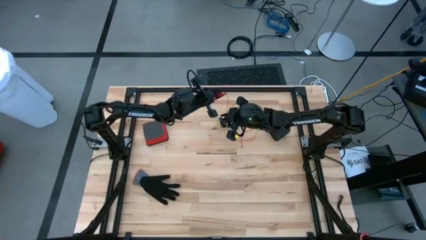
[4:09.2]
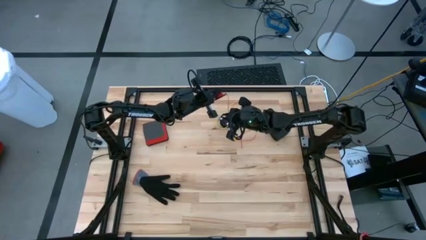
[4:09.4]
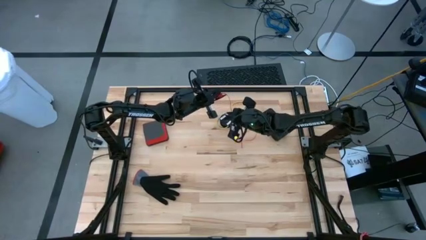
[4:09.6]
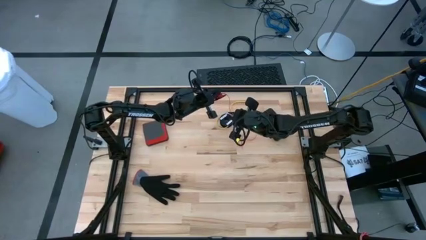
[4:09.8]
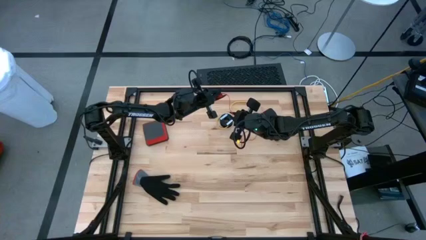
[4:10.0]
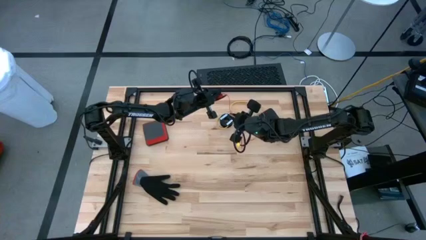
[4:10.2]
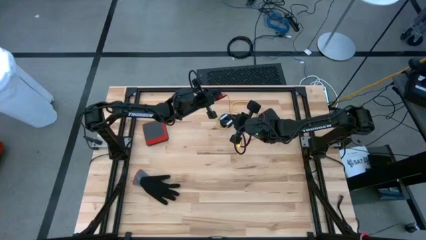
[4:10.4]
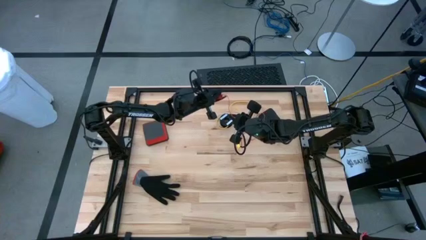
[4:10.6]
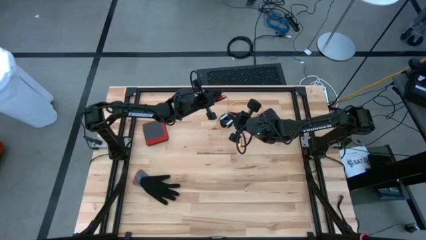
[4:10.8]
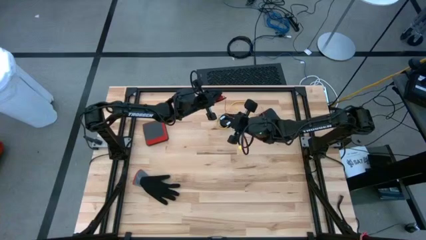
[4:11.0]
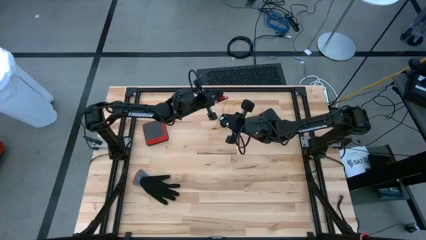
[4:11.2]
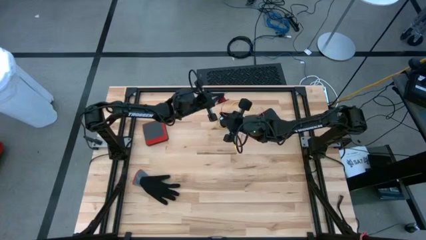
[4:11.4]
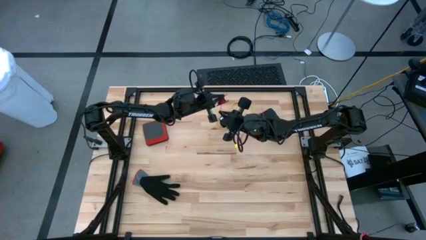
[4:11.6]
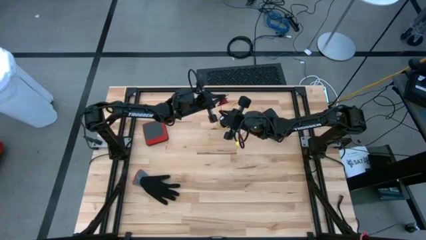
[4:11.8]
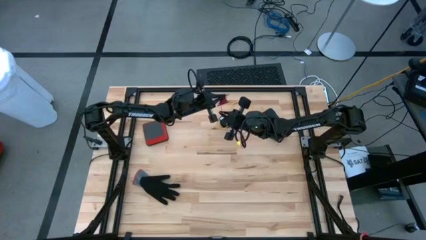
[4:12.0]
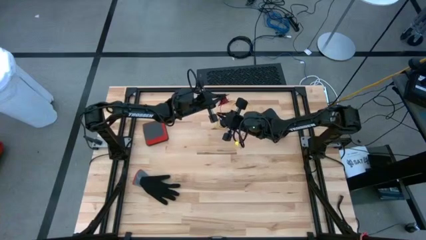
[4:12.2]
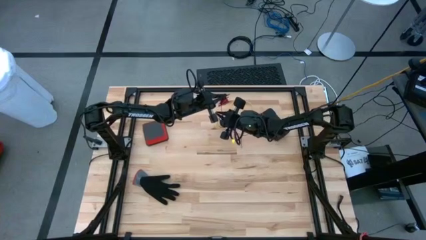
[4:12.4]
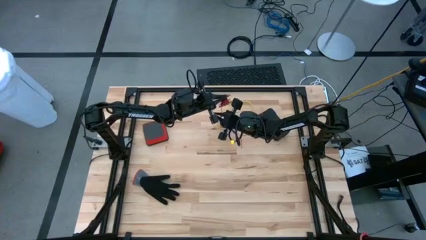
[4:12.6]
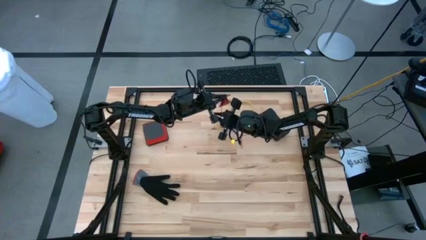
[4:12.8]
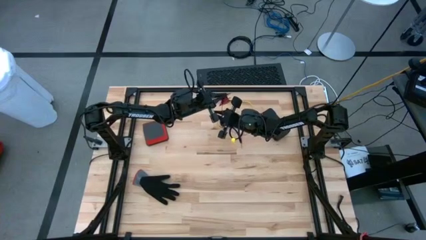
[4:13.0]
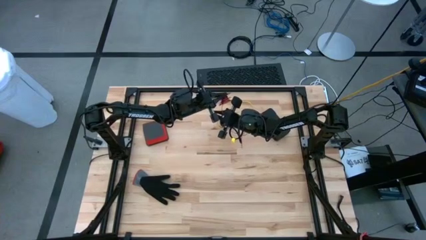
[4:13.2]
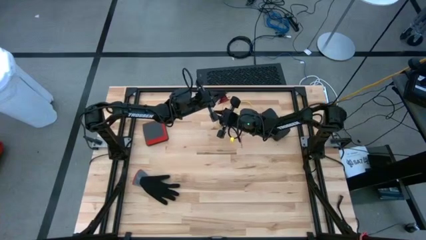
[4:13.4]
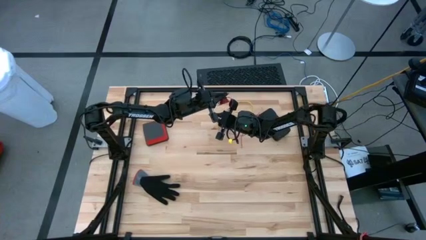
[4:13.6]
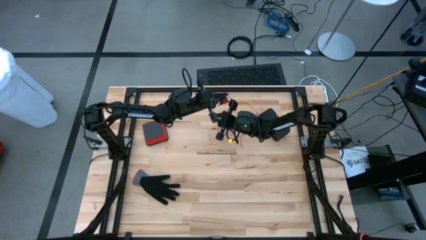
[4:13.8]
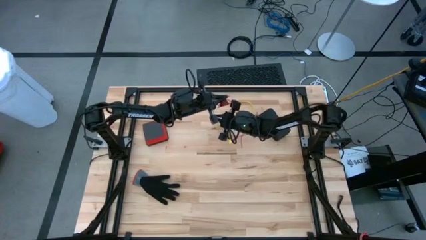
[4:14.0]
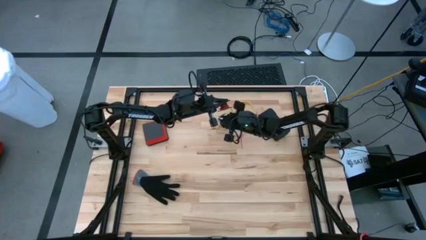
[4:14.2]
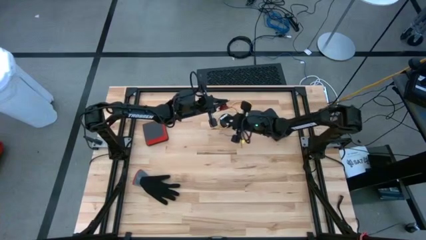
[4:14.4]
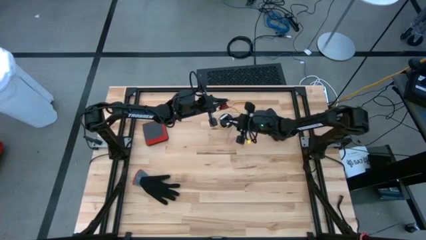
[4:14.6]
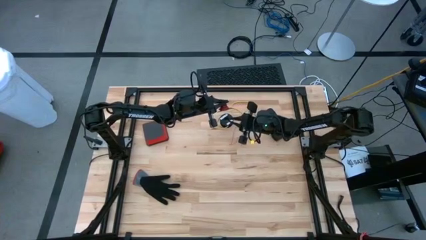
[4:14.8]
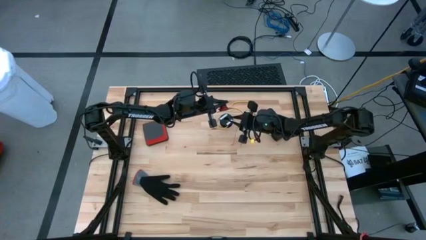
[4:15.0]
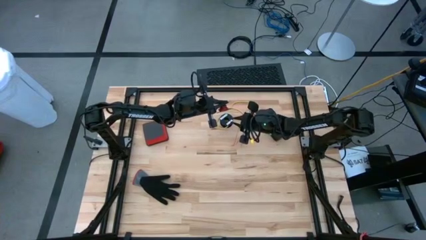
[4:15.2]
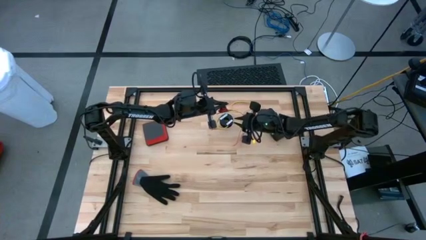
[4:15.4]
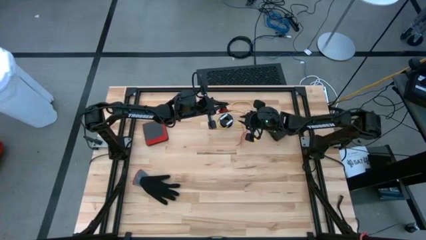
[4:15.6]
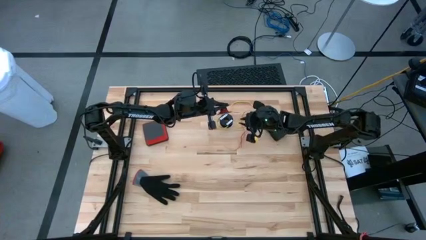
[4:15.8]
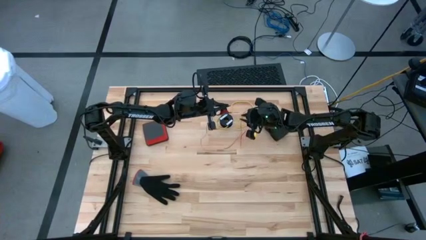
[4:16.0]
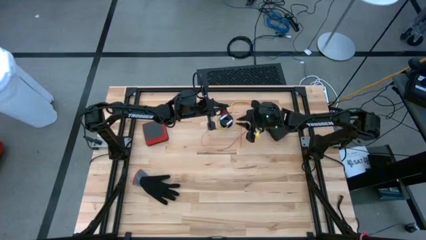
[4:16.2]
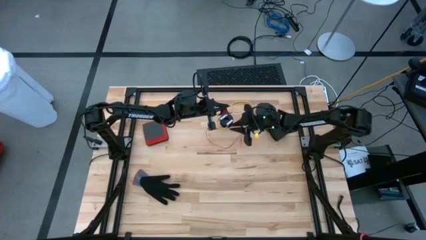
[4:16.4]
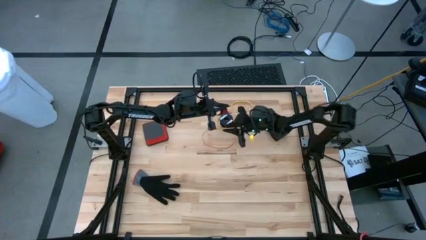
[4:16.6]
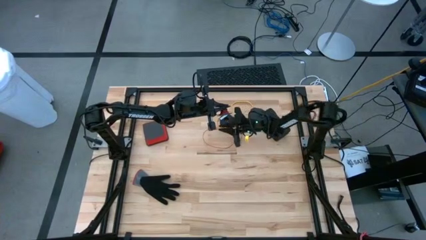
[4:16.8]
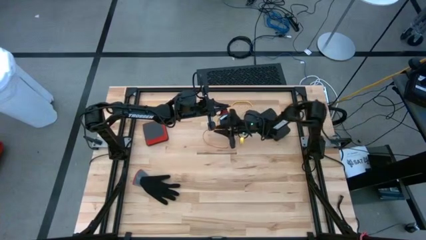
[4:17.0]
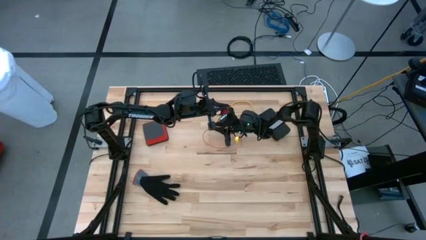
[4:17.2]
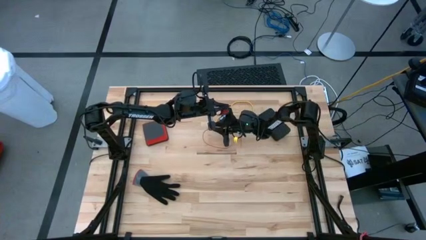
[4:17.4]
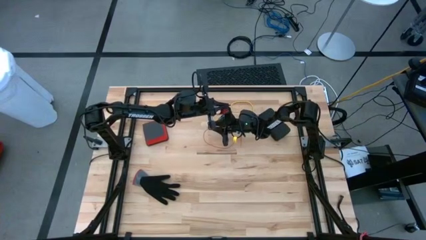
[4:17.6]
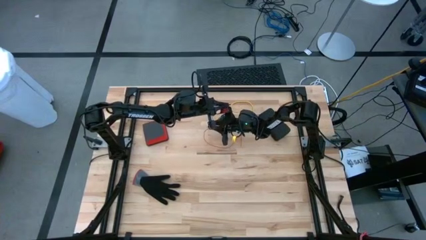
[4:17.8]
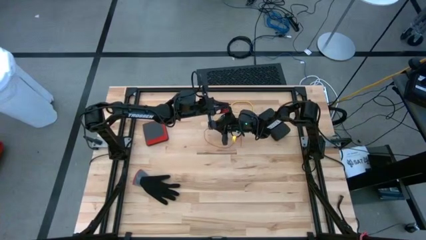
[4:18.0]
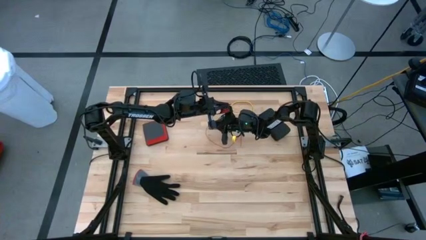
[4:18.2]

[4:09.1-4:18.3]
Task: Coil cords
Coil the red wire into the spool

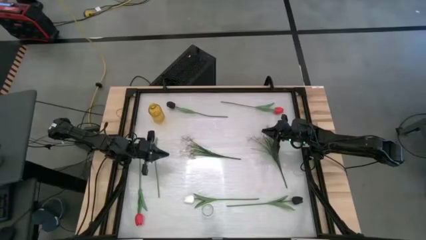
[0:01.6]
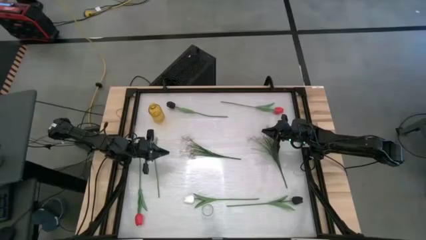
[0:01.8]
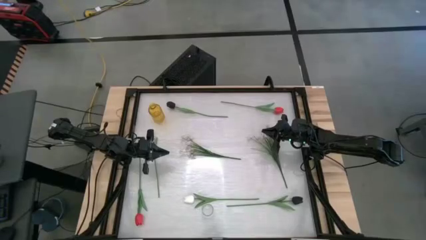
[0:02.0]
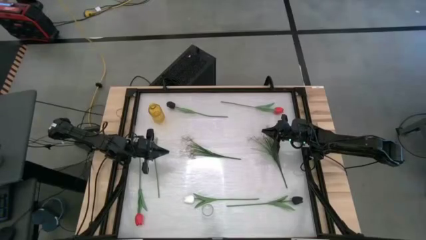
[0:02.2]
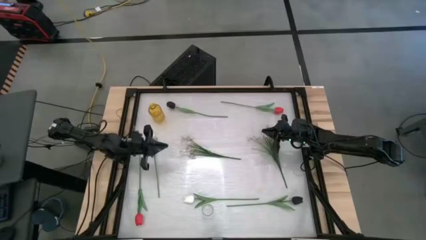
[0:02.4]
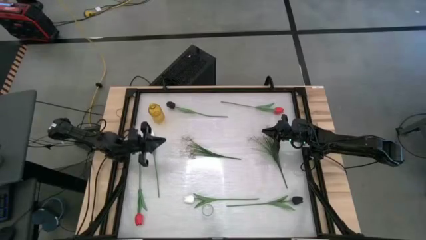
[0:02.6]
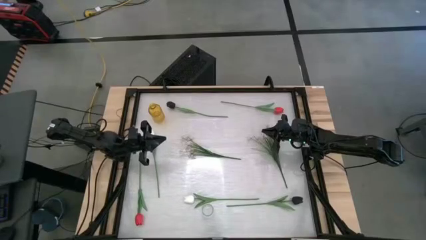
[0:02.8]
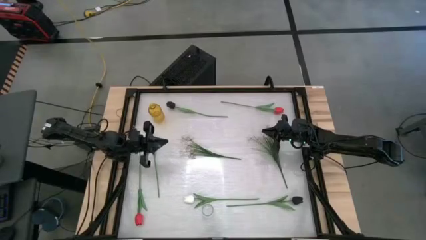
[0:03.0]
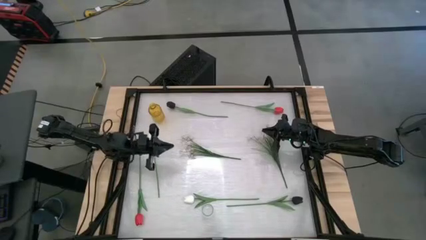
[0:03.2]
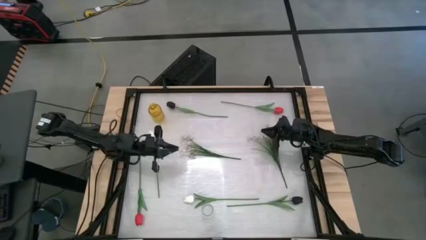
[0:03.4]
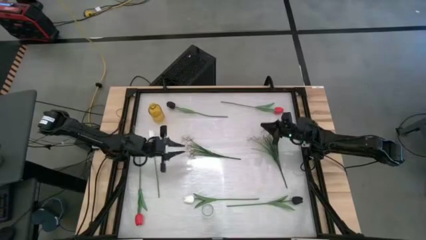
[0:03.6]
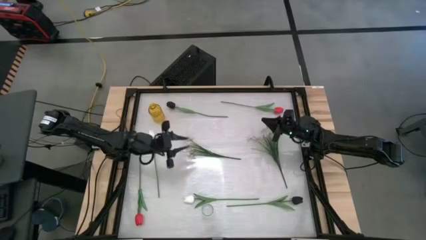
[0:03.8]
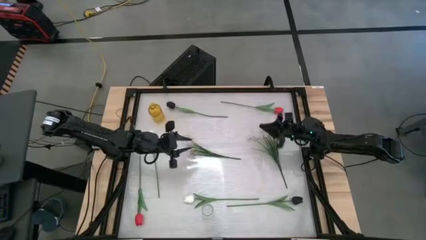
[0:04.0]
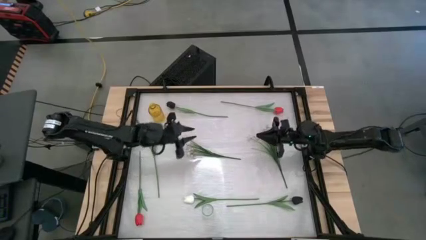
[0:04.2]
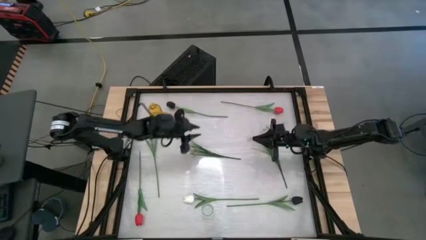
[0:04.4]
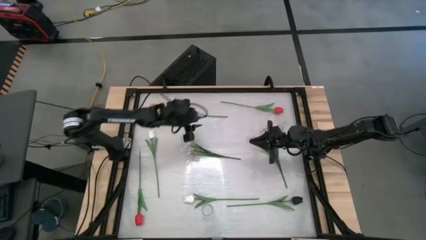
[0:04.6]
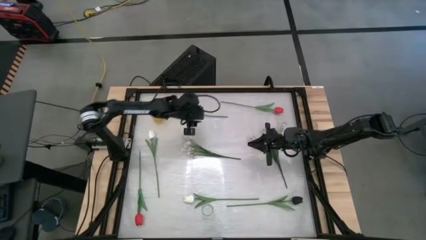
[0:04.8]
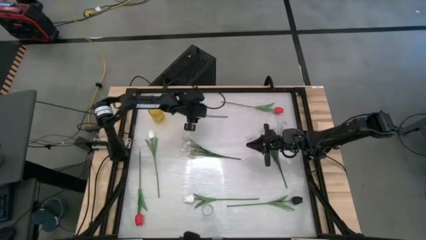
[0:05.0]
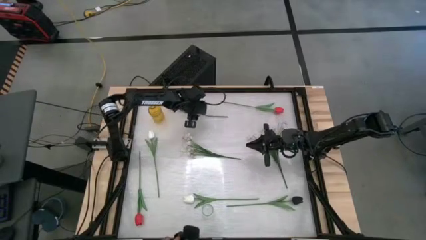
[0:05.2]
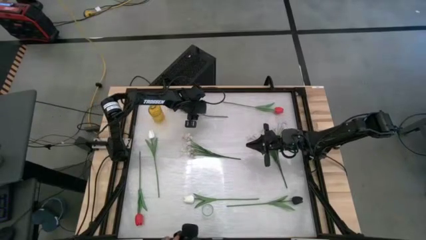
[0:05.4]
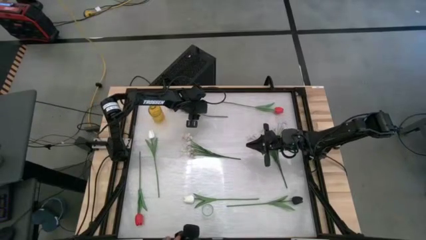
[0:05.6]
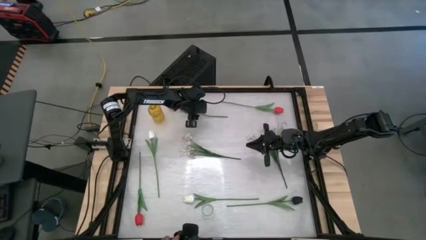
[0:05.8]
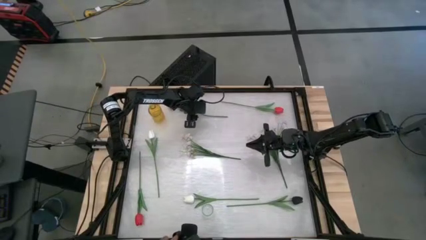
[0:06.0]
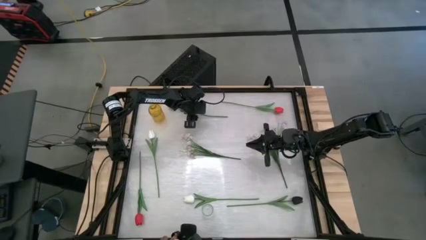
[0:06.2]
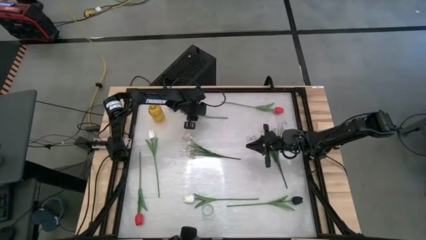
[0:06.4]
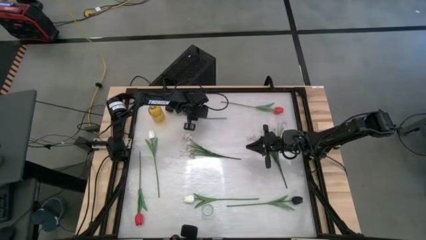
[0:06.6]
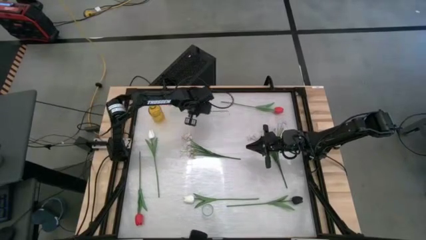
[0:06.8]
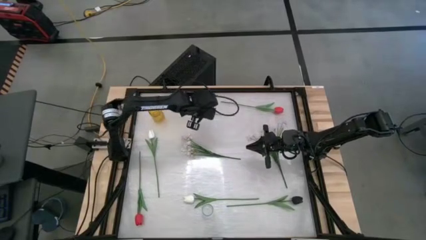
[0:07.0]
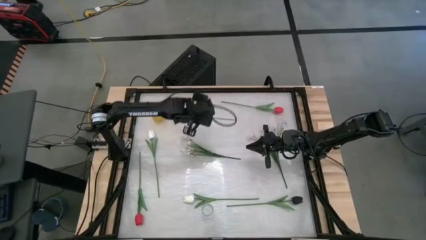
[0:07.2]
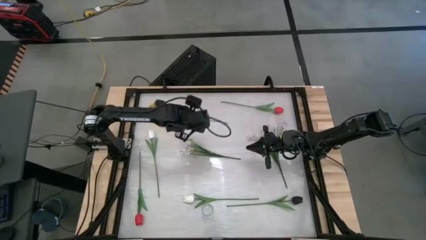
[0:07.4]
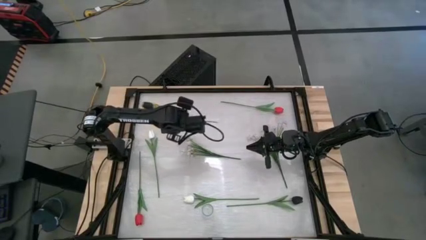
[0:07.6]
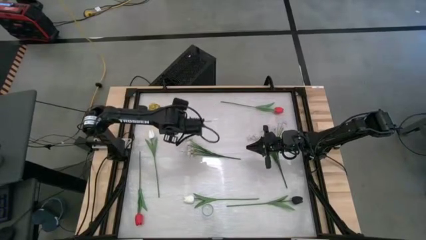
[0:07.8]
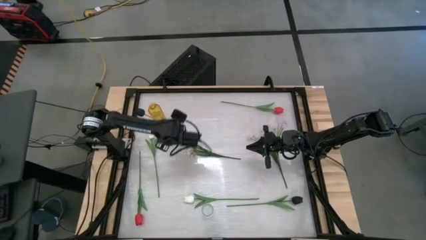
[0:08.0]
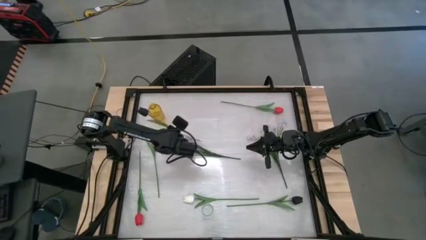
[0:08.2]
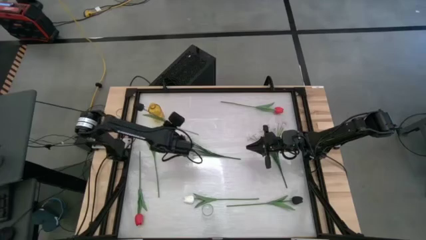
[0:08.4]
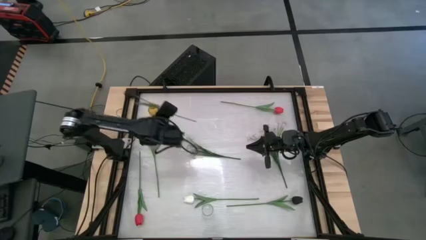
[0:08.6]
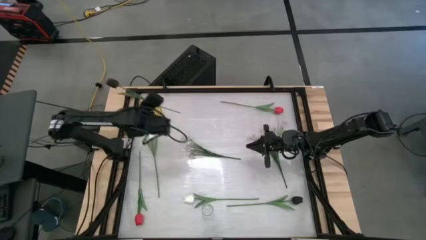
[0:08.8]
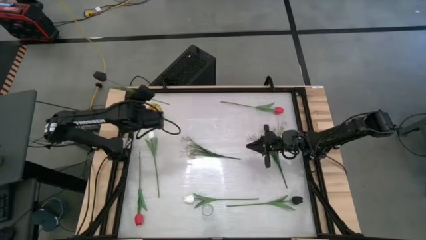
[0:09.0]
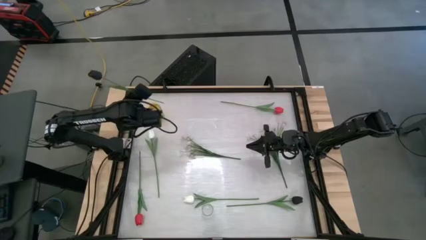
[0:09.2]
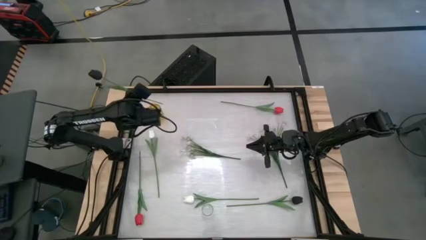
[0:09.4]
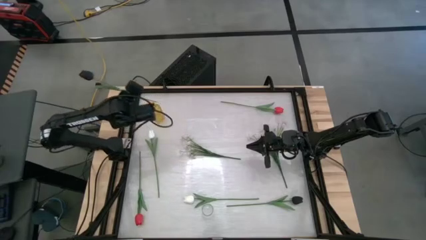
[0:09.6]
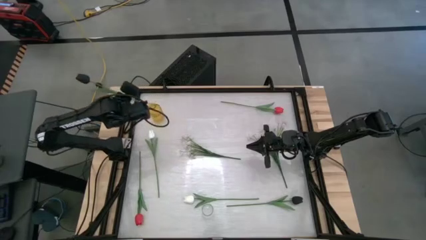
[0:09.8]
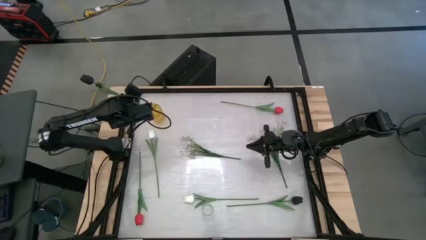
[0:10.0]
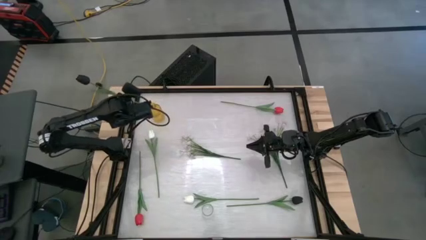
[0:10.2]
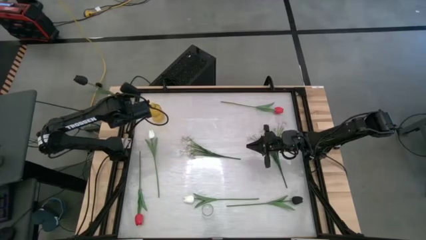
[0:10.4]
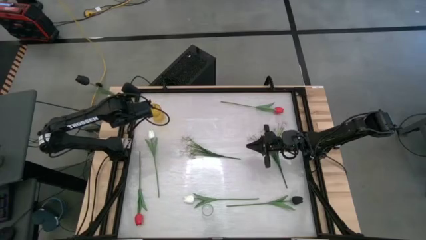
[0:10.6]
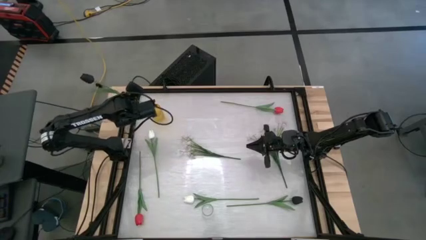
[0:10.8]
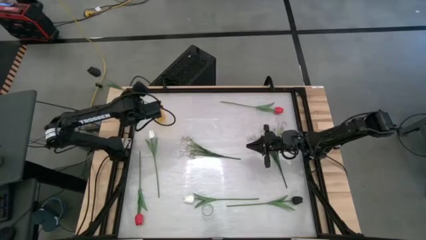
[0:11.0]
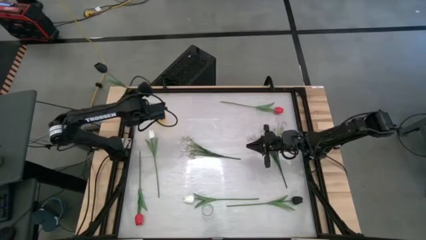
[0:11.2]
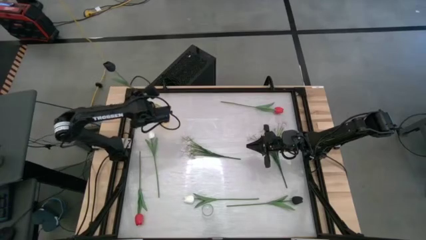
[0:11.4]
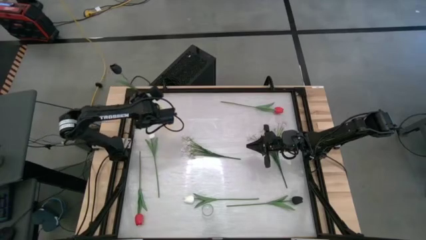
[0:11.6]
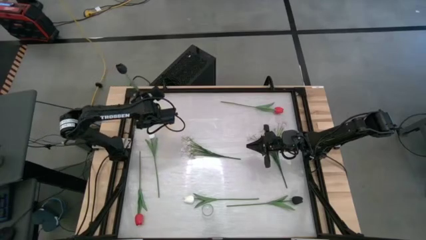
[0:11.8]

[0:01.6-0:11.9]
Task: Sort flowers into vase by color
Put the top black tulip into the yellow vase
